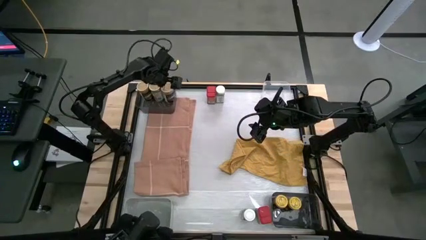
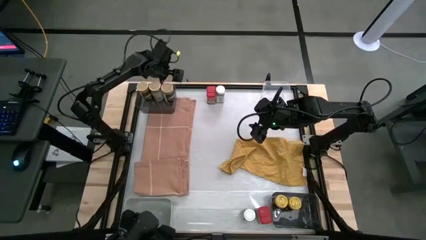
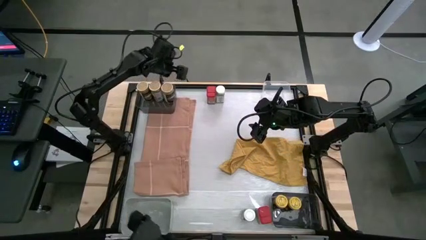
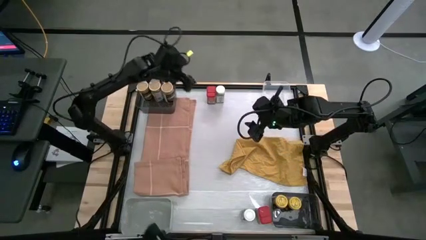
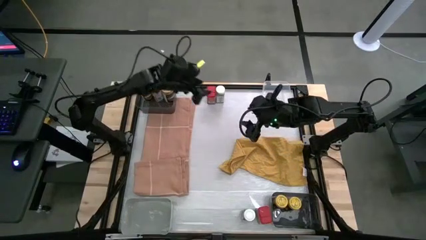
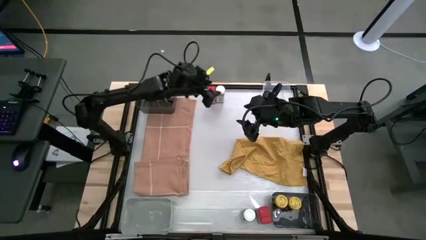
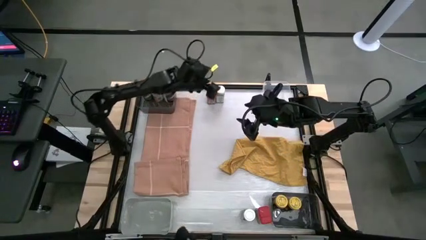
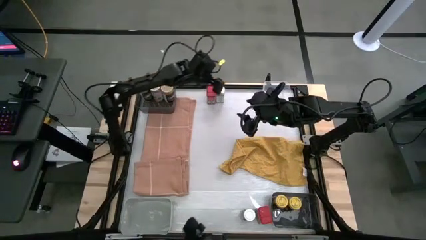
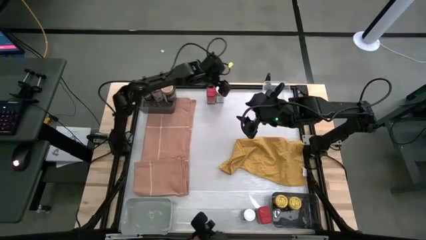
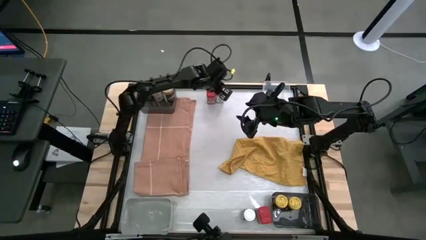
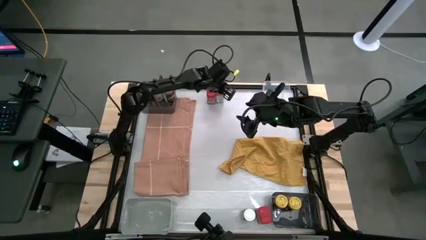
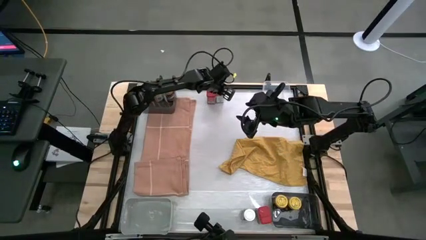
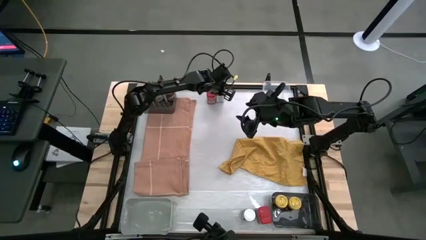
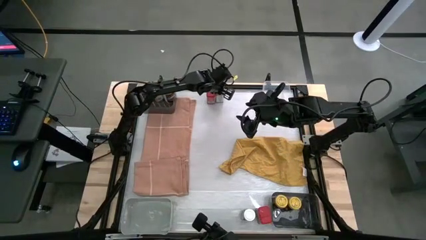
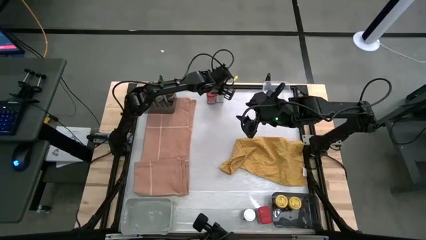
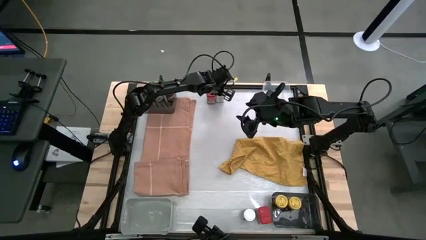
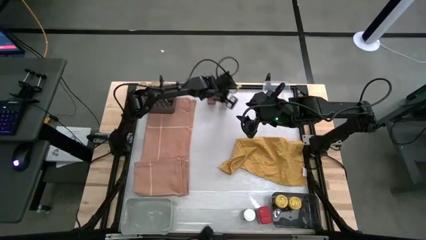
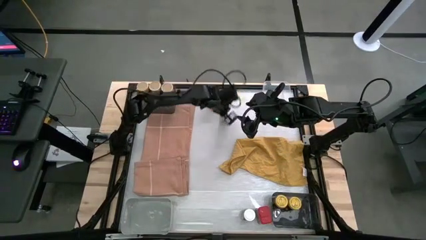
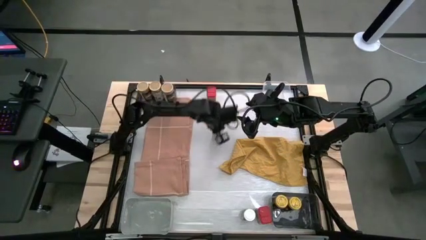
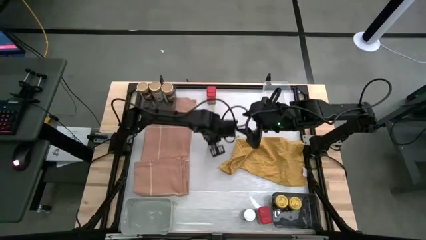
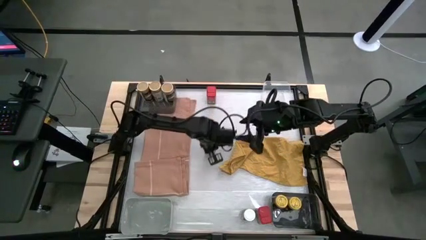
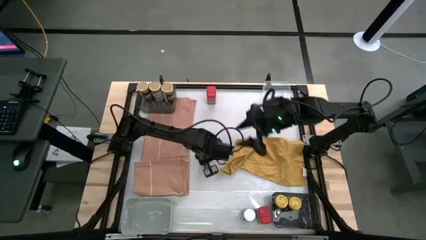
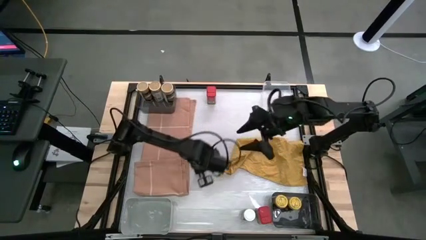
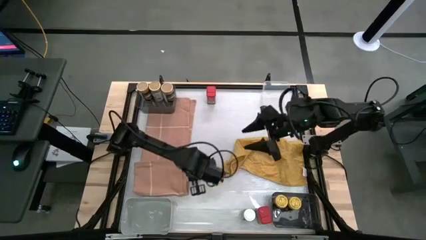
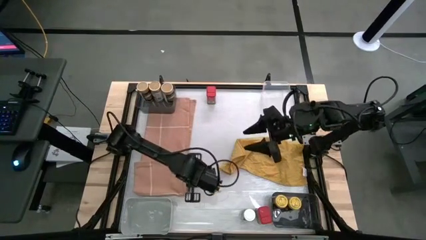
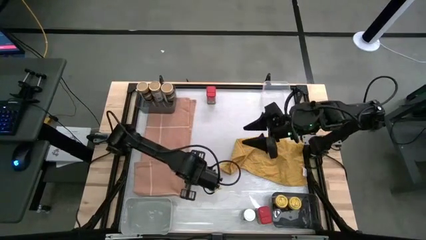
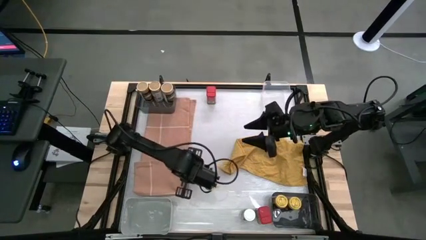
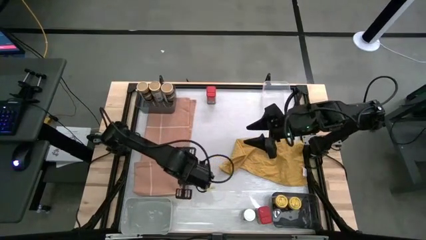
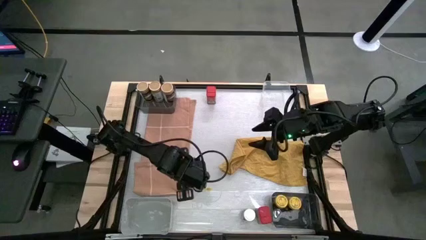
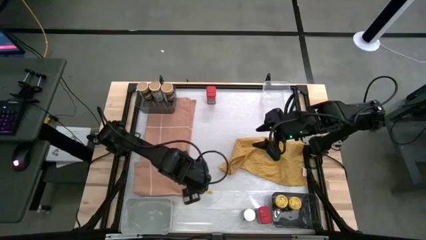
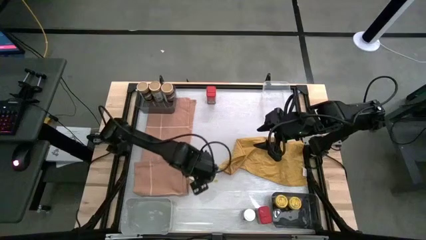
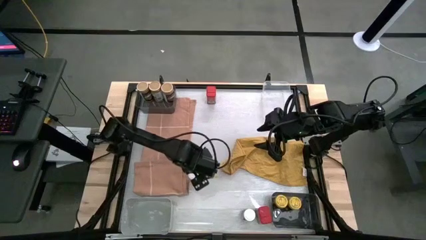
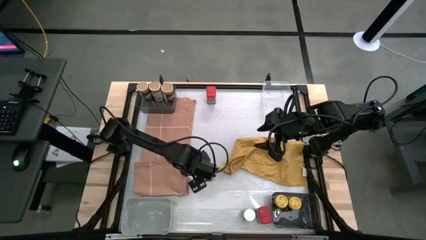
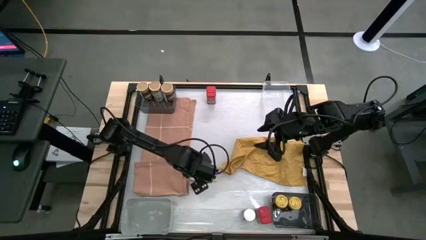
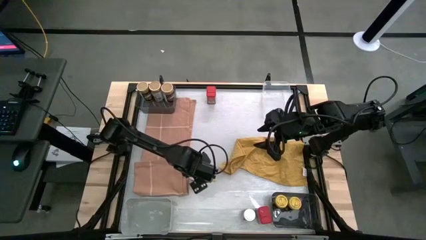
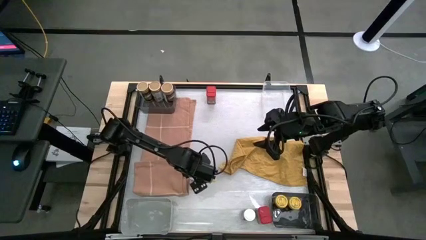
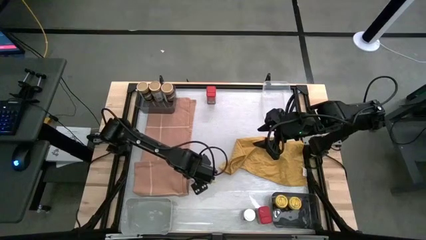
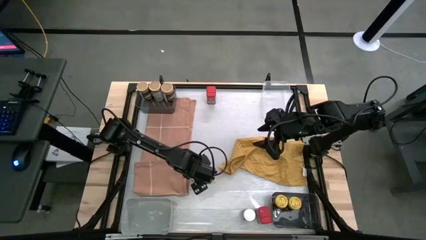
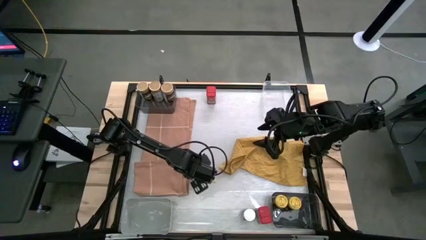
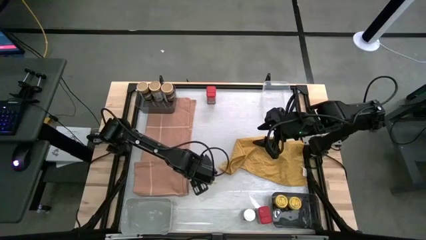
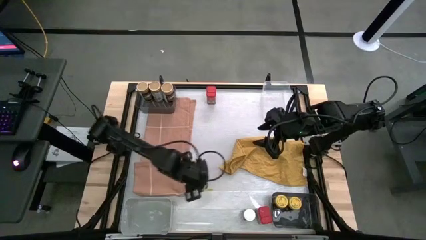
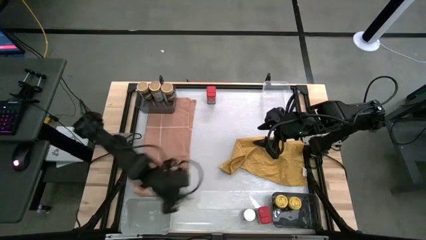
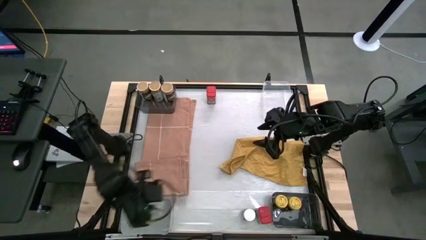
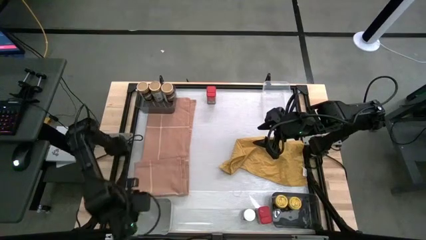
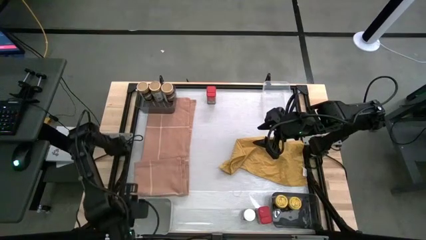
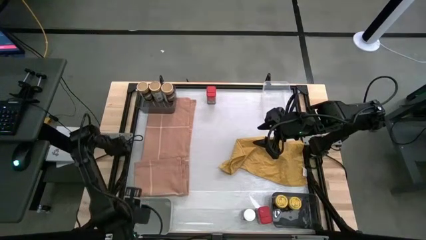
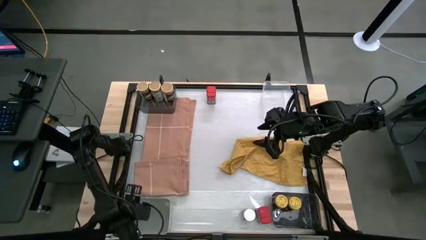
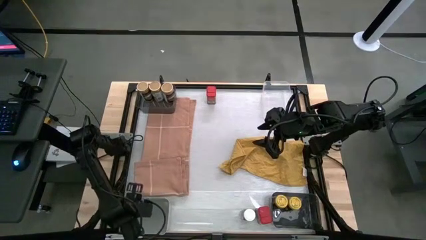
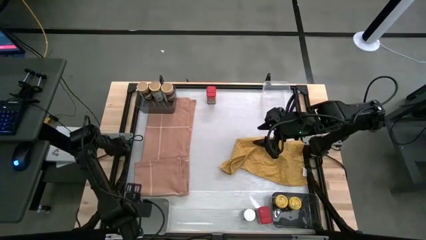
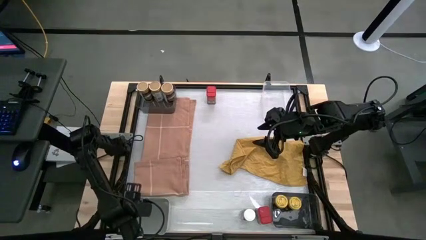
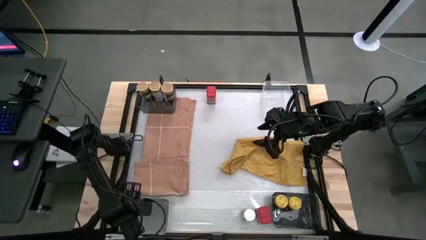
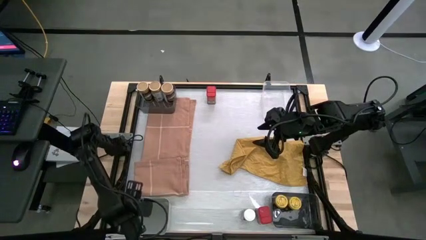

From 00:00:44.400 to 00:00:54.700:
Task: Sort spices by type
Put the top white seasoning bottle into the gray bin

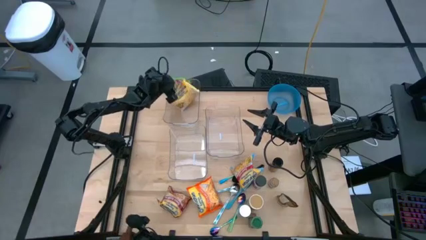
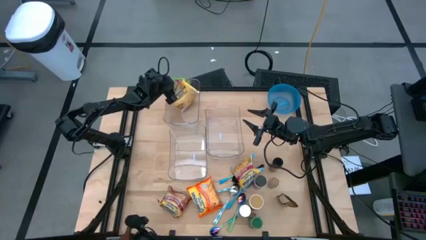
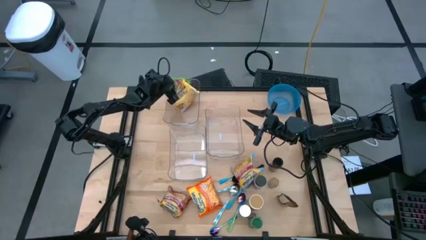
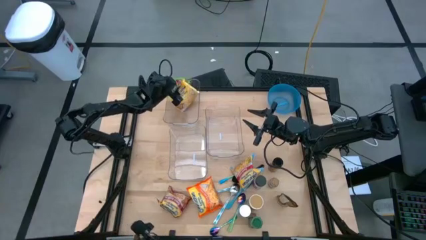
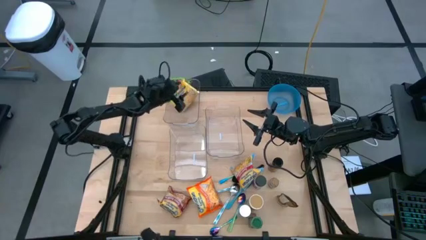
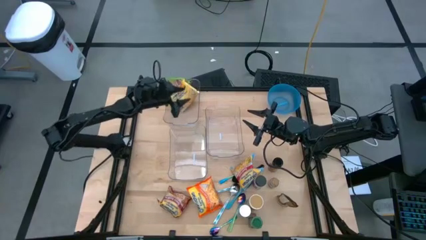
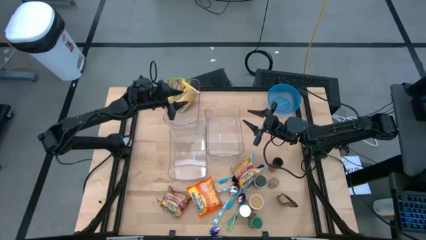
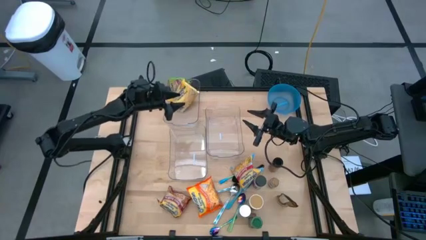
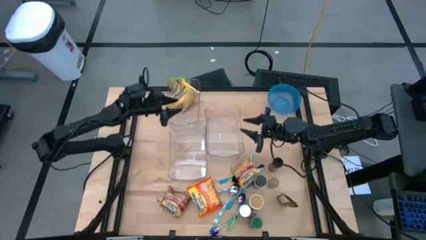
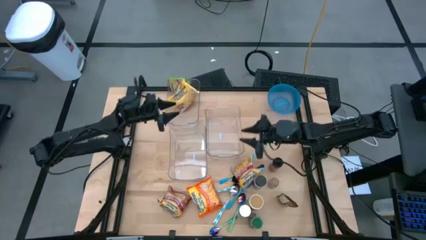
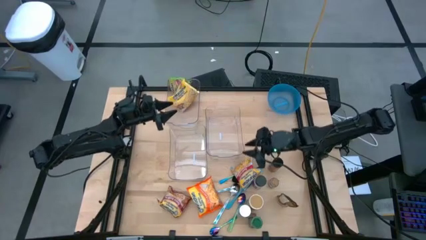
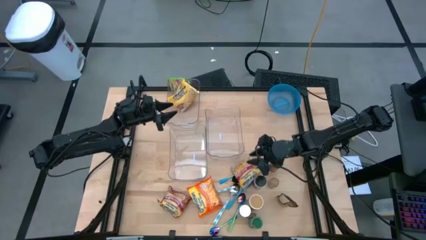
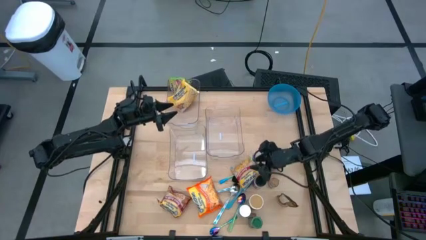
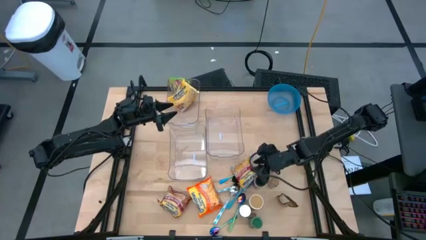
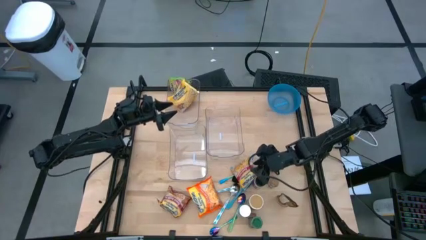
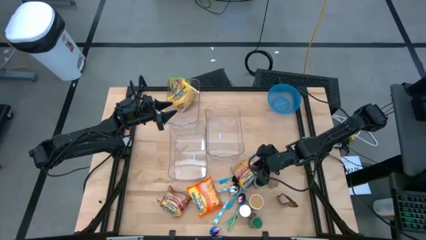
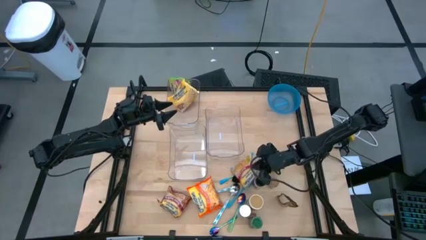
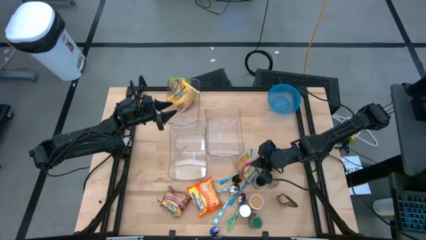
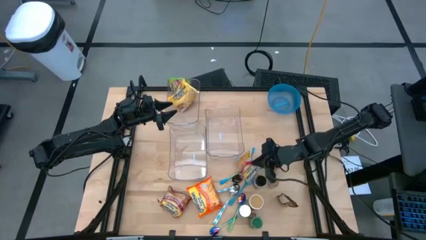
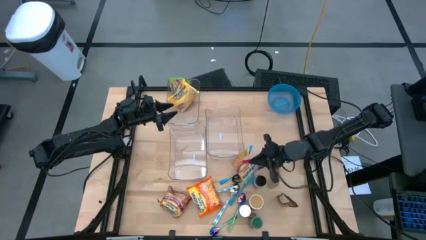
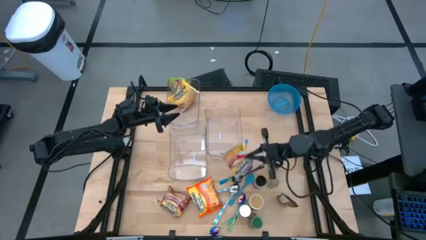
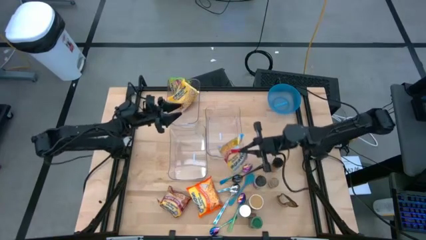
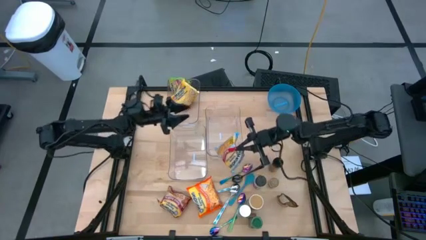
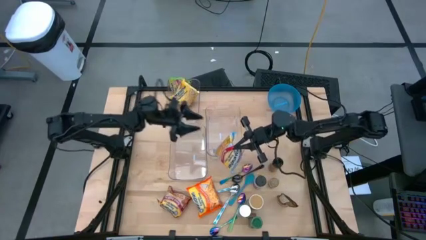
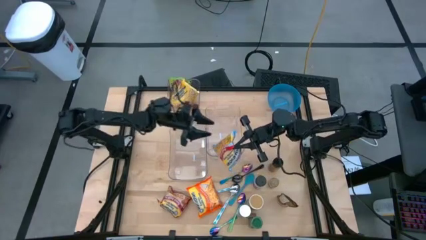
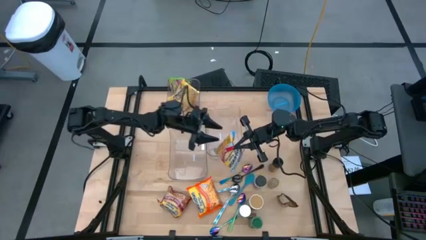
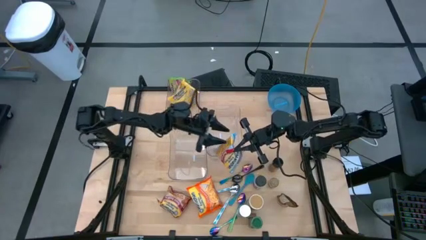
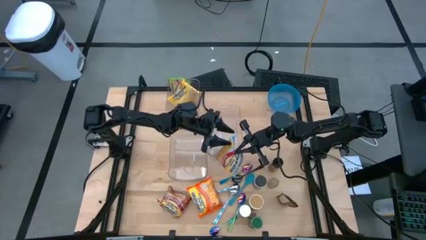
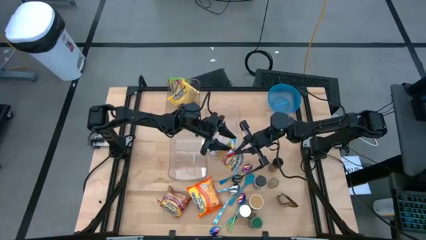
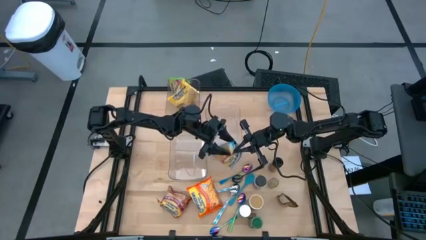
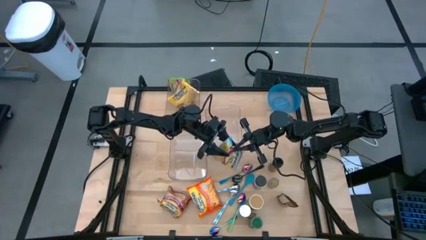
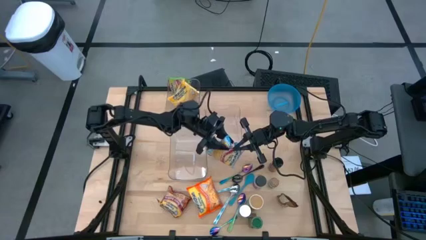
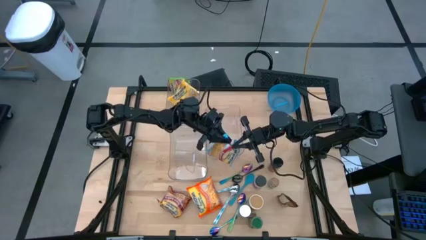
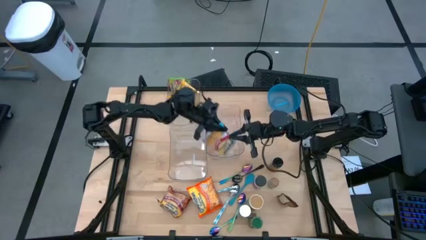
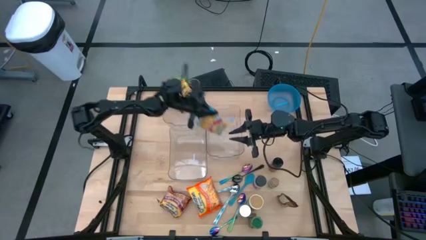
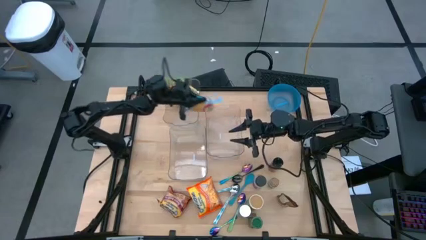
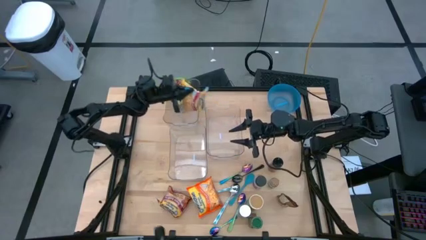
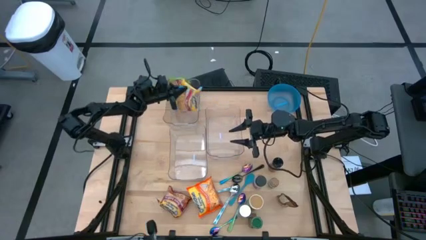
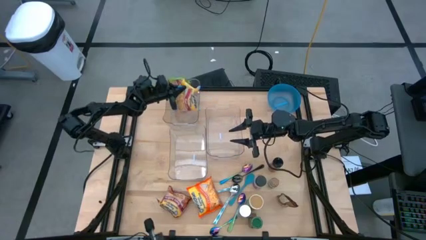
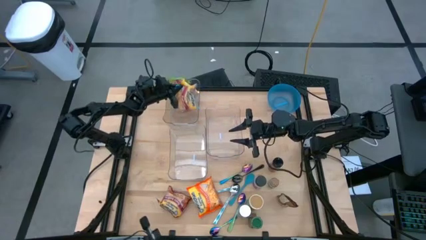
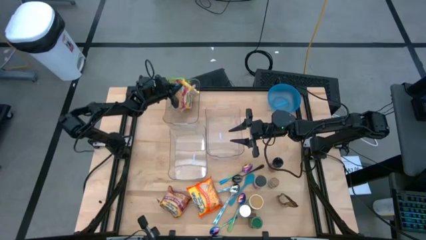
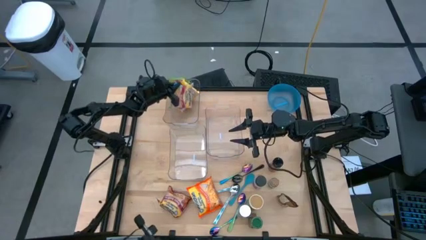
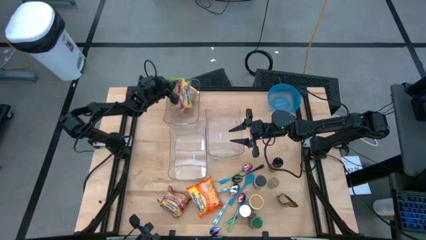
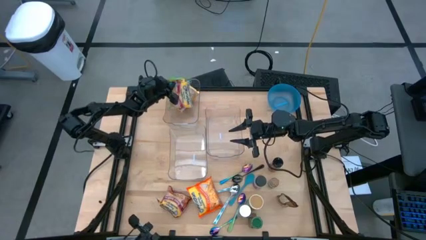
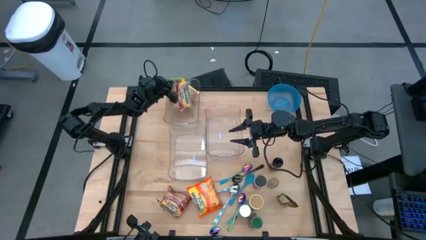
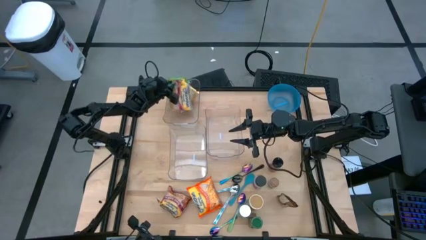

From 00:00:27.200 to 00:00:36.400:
Task: Pick & Place Food Item
Put the blue noodle pack into the top transparent bin
